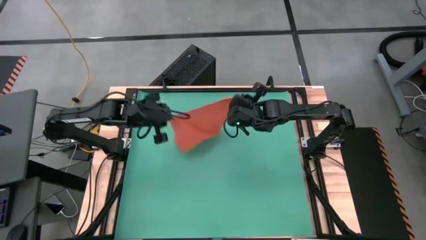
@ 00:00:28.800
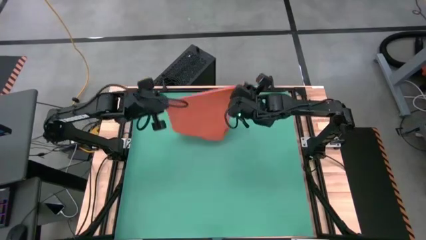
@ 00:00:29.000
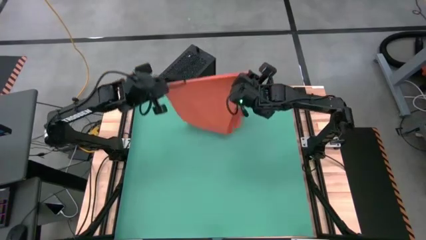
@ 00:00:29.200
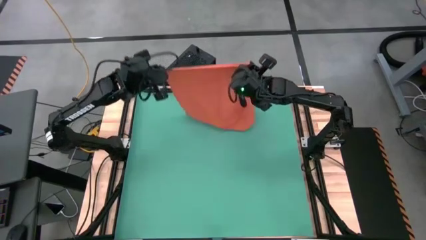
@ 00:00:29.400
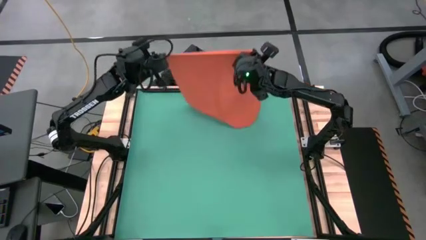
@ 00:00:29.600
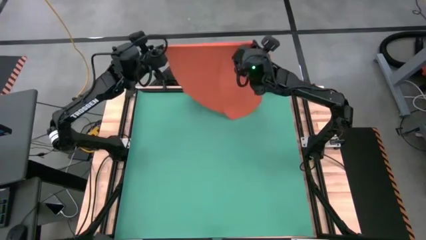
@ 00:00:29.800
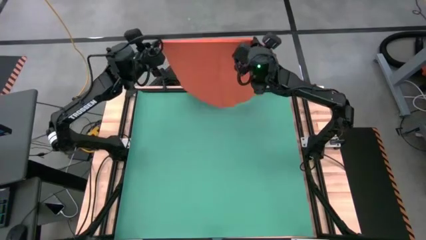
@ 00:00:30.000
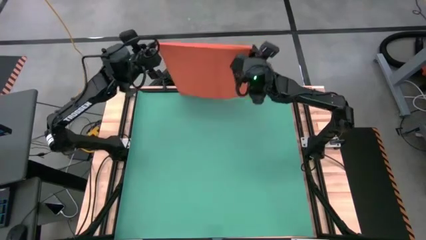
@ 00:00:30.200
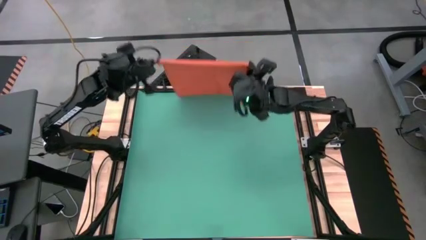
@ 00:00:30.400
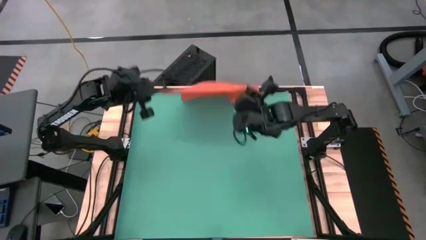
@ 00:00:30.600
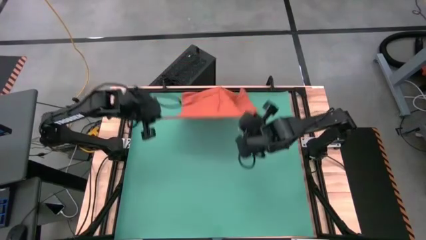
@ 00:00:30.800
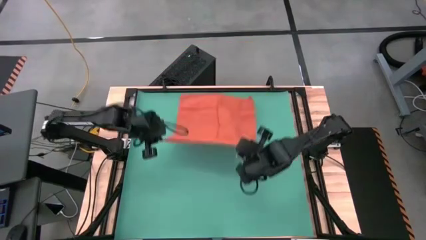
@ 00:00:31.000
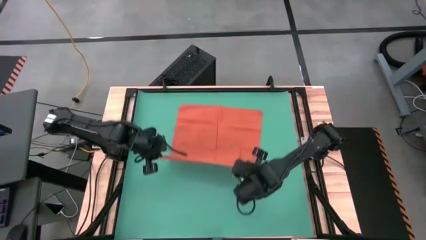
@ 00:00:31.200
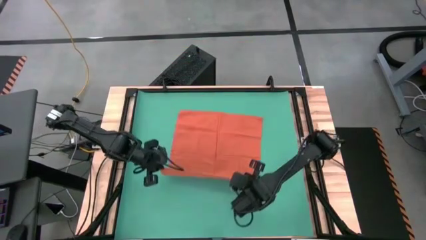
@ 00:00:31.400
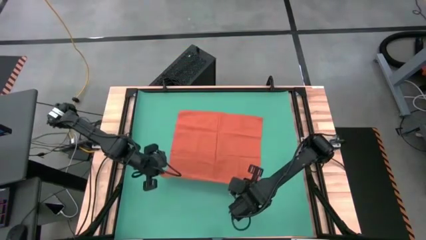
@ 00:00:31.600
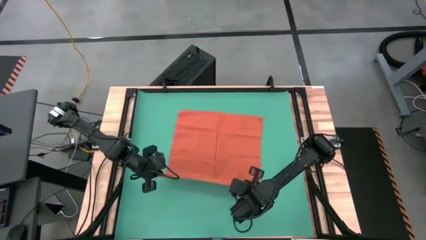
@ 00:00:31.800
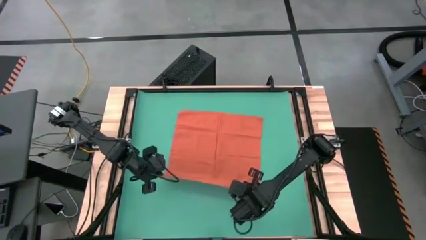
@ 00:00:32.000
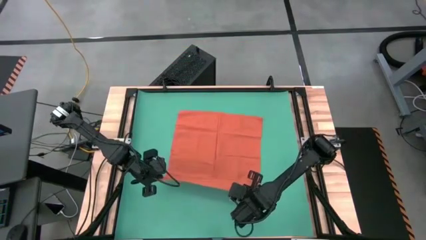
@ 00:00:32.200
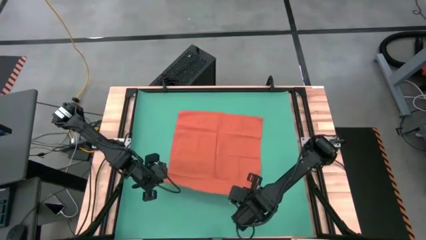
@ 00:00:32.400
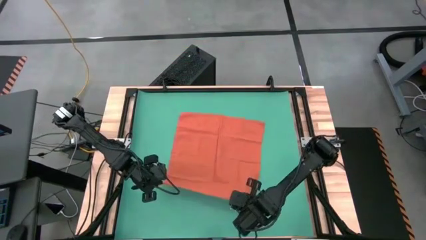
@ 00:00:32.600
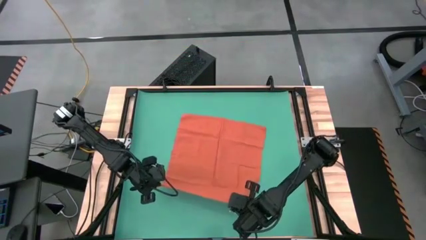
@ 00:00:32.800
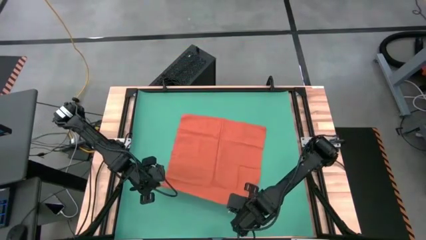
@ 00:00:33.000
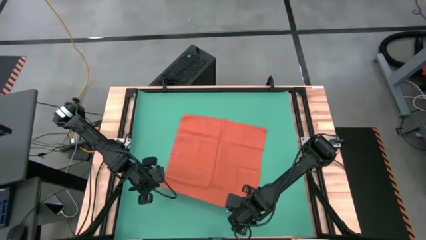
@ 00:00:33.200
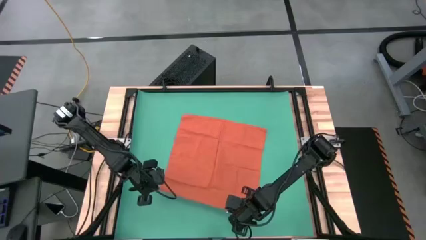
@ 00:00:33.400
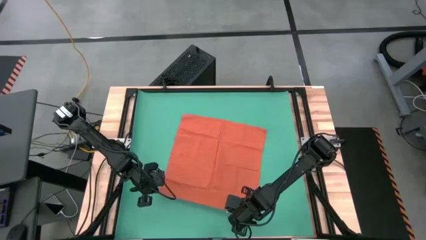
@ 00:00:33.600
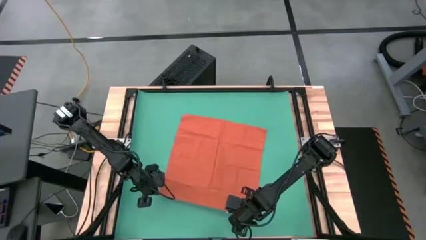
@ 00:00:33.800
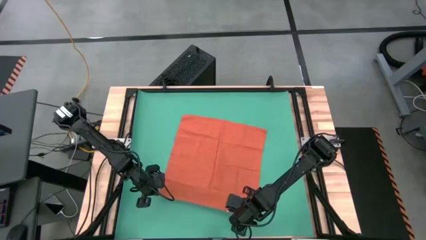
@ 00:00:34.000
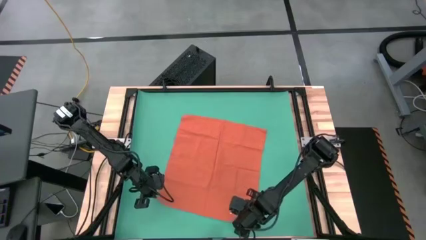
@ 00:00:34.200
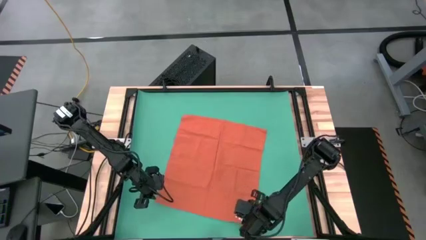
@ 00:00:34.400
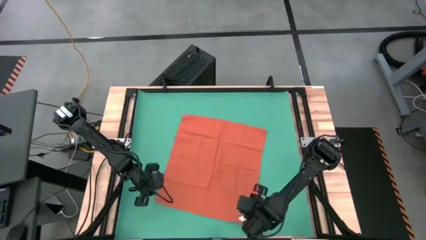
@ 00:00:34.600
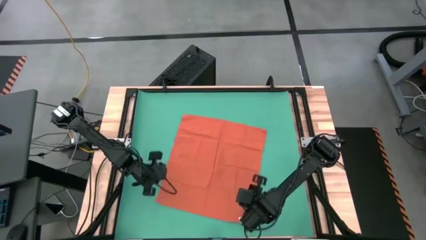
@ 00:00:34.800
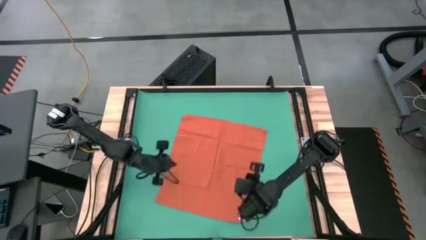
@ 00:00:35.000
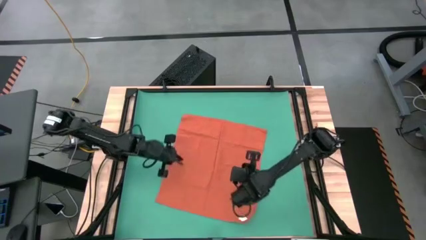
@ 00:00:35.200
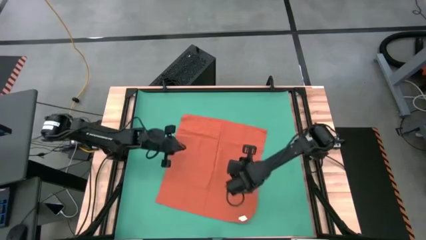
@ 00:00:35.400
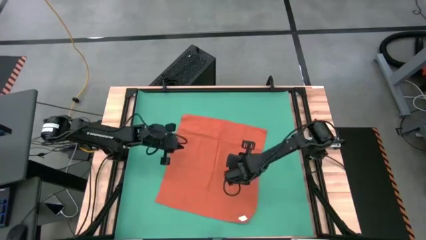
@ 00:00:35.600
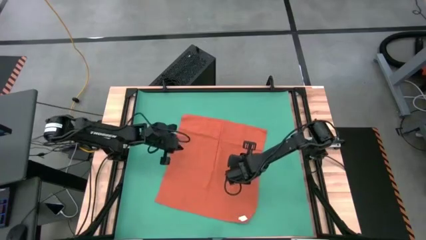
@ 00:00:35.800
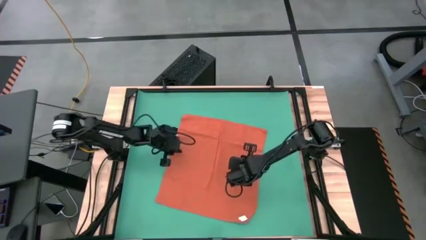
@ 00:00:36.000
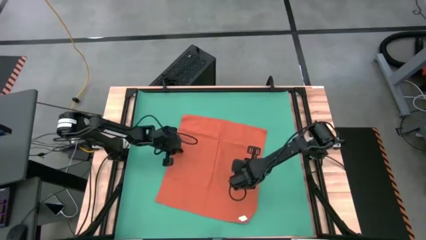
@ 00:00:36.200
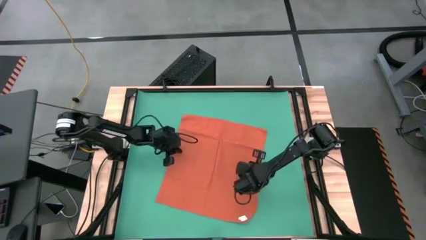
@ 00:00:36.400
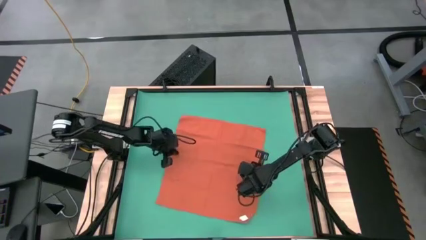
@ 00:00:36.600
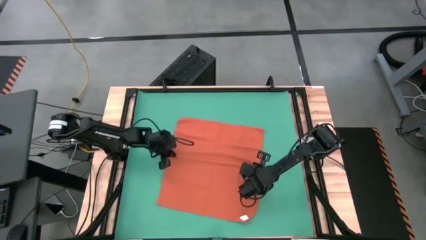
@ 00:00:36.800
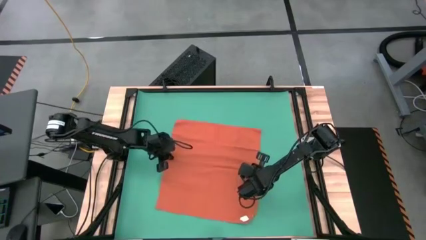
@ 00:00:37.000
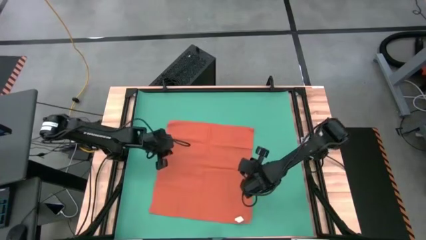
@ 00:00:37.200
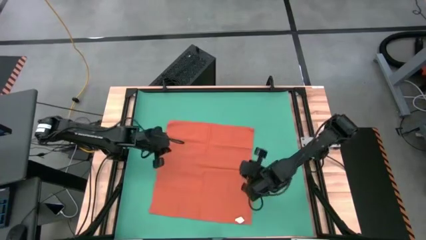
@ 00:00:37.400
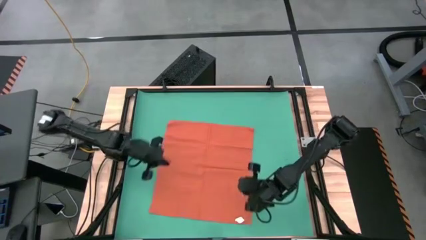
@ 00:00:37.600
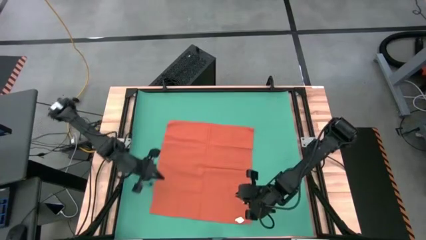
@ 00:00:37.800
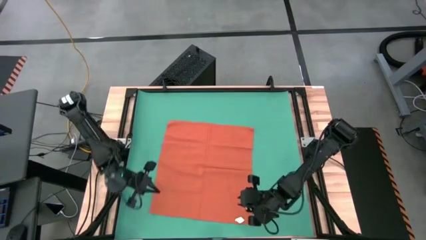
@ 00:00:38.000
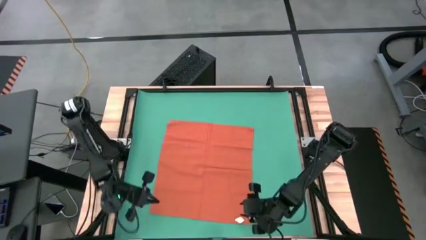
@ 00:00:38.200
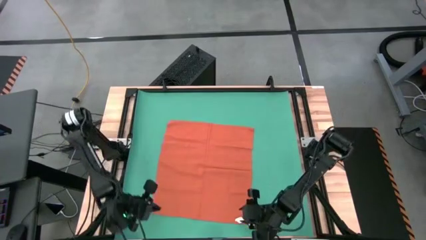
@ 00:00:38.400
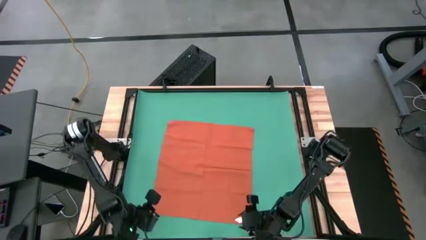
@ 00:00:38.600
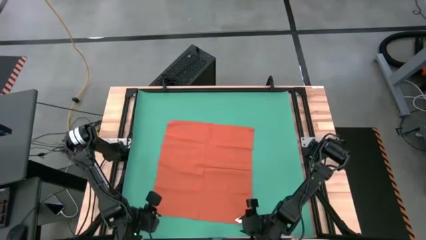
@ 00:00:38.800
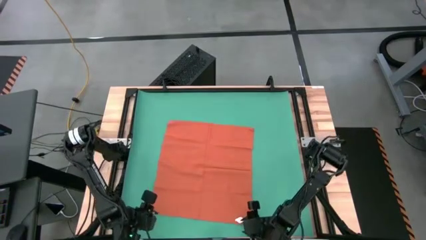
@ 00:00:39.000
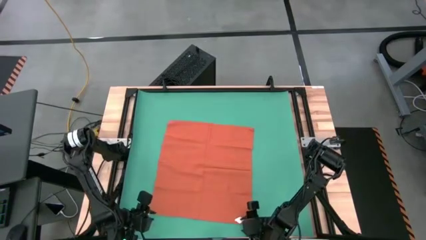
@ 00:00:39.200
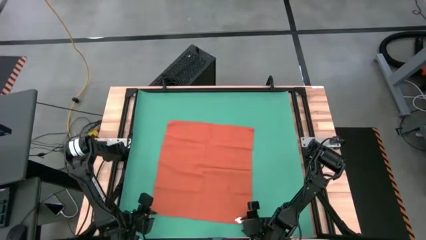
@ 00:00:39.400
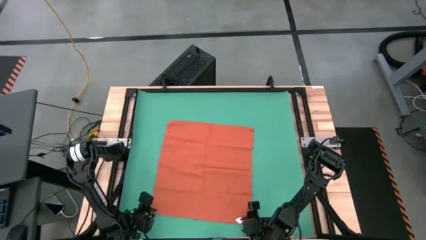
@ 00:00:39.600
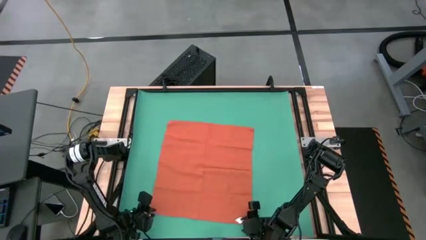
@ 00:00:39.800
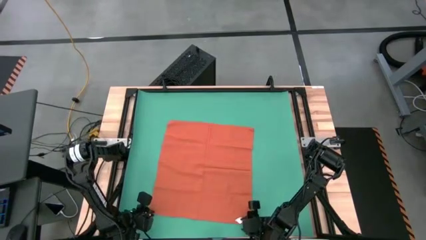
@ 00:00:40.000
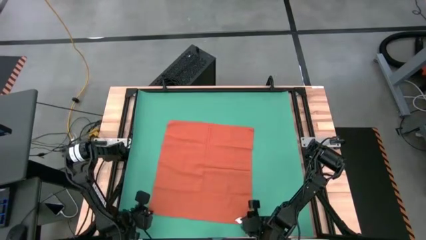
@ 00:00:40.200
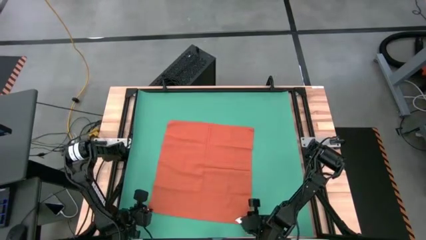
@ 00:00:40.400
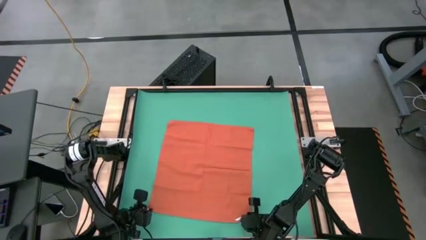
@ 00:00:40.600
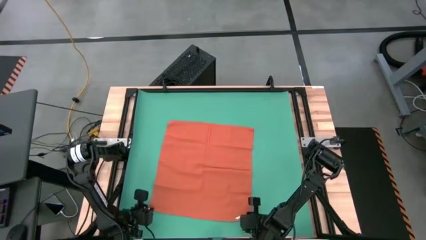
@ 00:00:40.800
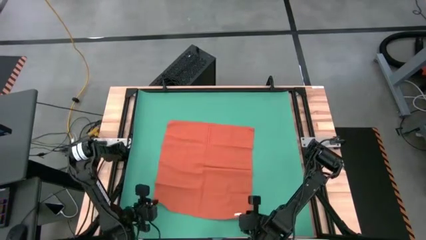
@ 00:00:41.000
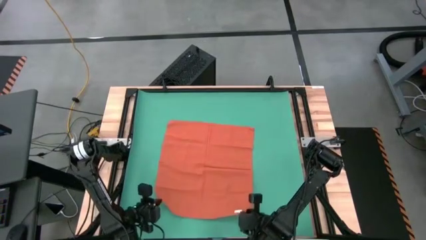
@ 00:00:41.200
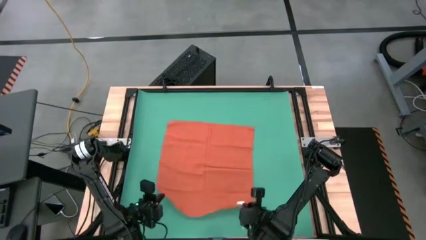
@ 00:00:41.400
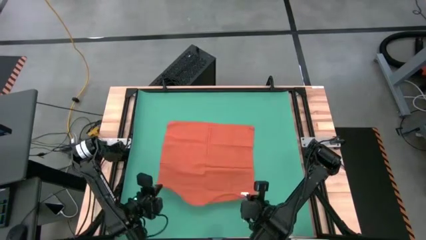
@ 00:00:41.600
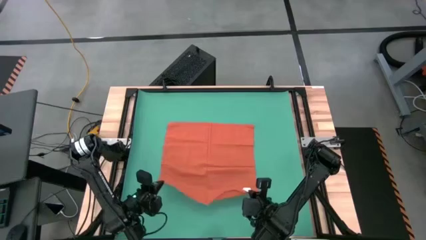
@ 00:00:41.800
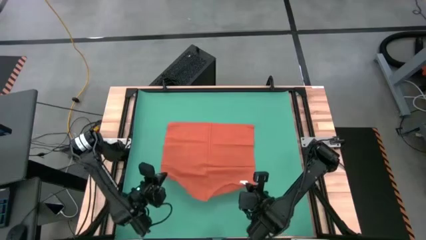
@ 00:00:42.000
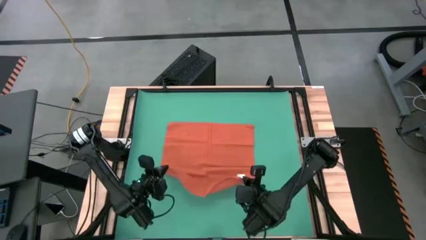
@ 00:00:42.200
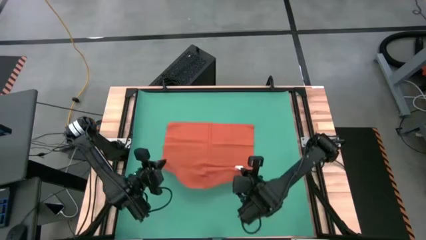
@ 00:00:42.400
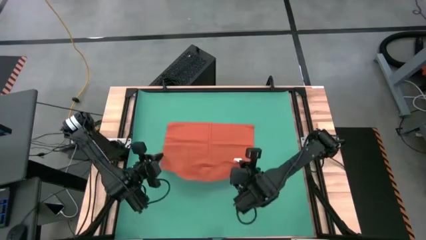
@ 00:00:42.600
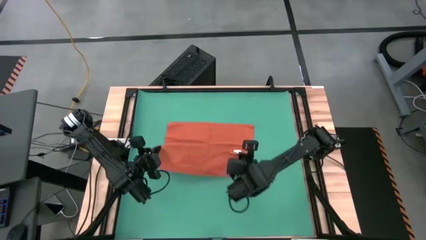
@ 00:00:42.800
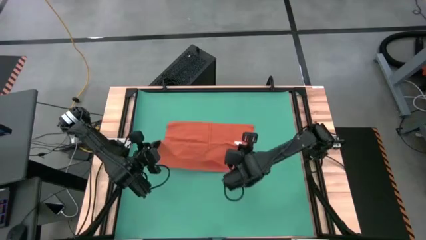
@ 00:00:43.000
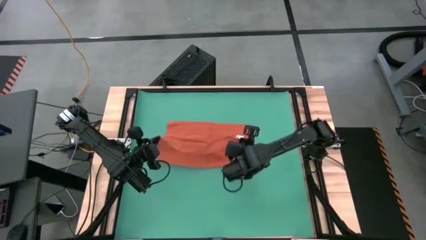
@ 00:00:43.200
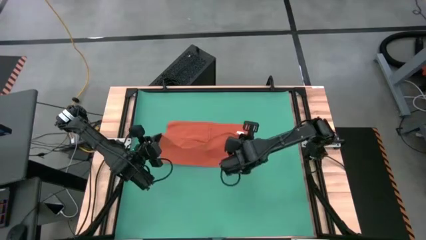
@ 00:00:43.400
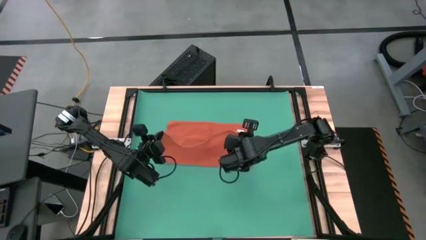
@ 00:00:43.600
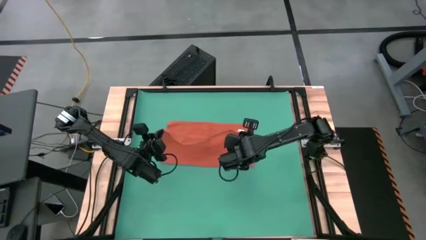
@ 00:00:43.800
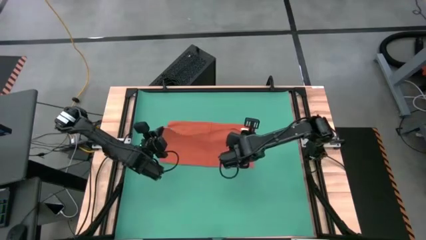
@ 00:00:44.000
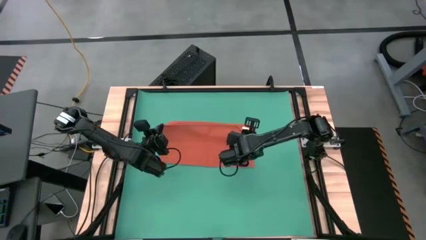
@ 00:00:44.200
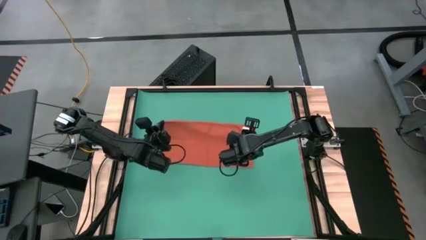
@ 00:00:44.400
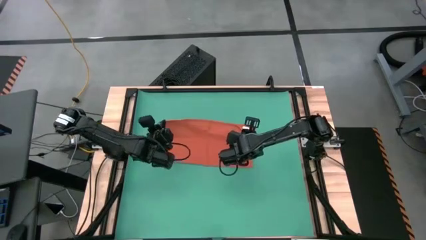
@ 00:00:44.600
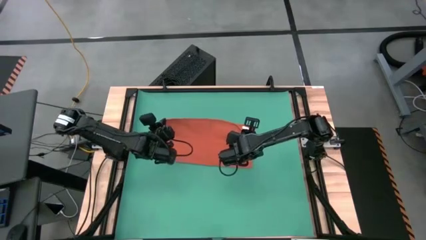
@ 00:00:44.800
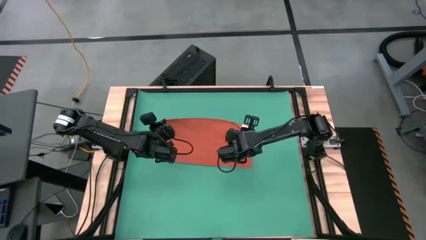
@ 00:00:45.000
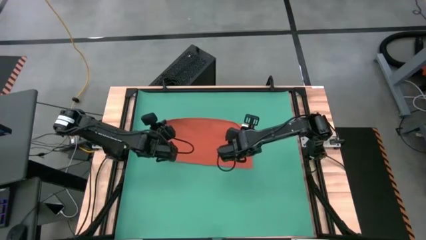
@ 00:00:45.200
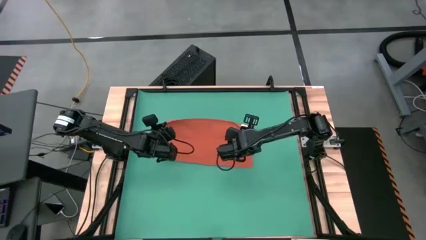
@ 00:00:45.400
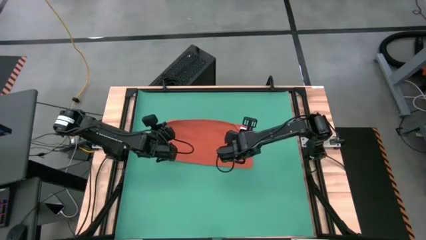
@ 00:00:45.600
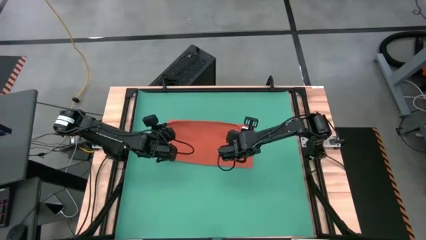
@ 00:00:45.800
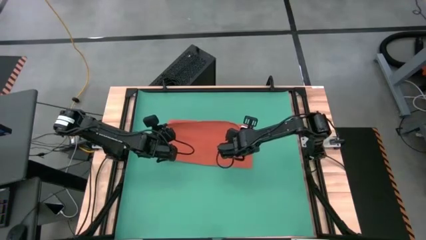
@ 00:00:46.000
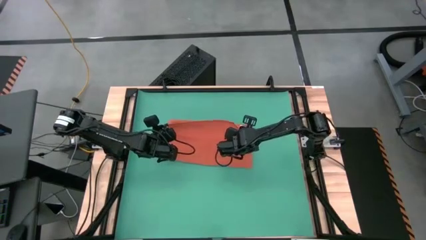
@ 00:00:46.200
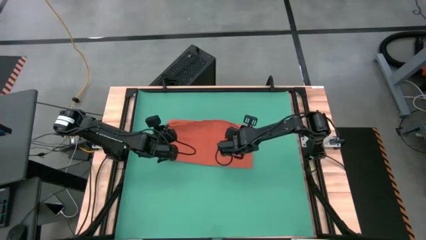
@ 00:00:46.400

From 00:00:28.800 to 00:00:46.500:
Task: Roll towel into tight, uniform cylinder
Fold the orange table napkin
